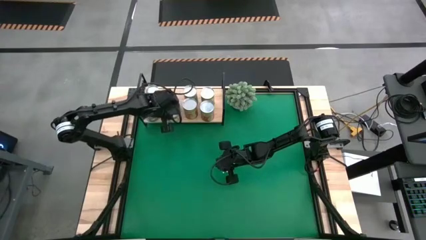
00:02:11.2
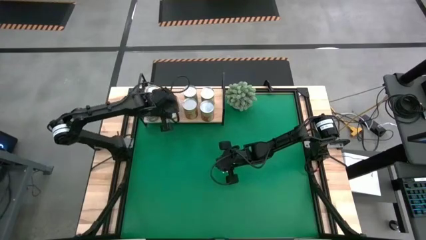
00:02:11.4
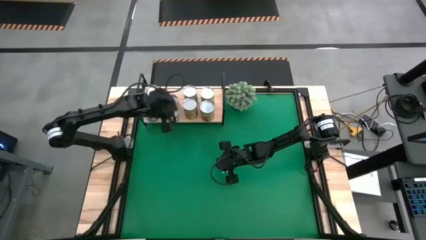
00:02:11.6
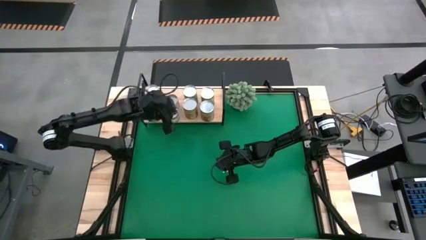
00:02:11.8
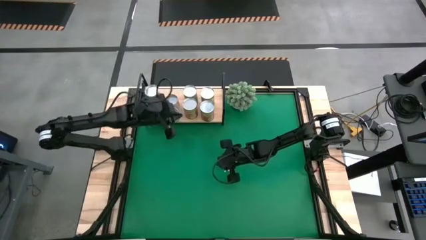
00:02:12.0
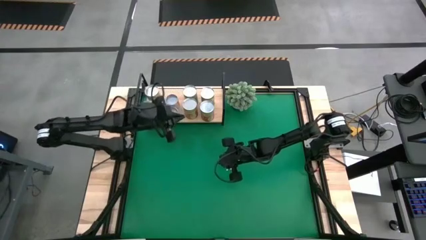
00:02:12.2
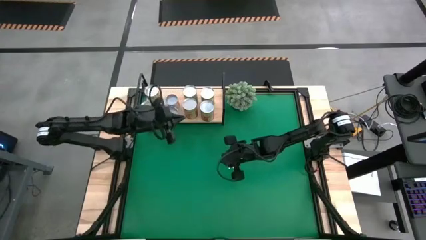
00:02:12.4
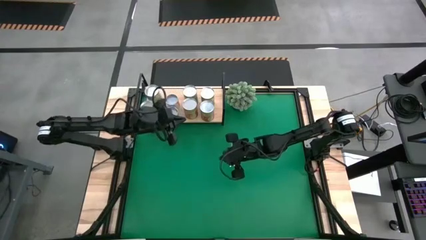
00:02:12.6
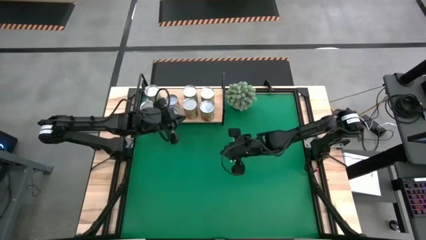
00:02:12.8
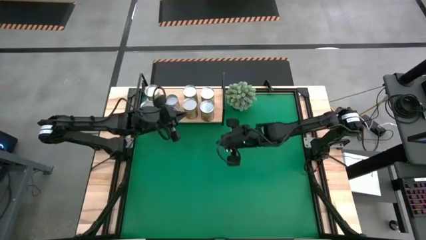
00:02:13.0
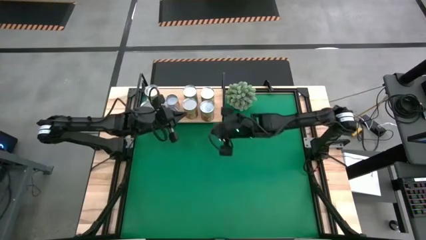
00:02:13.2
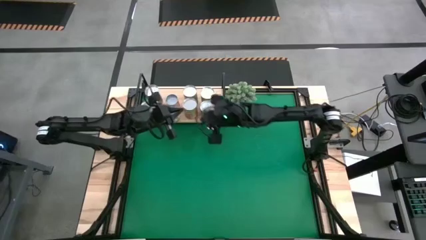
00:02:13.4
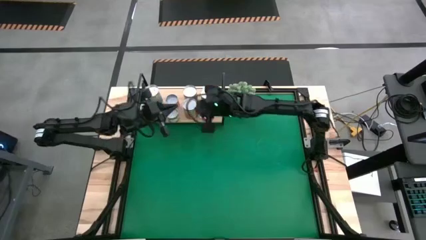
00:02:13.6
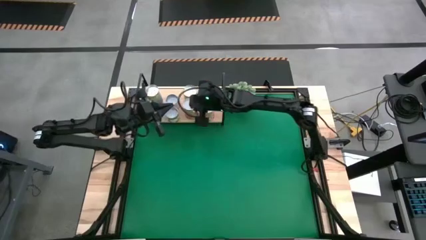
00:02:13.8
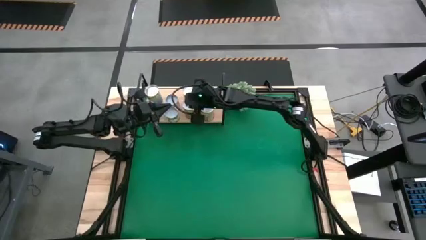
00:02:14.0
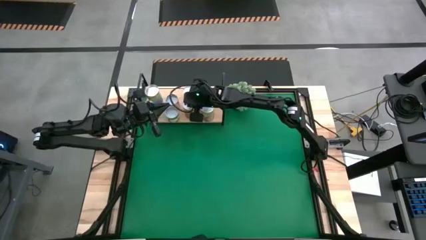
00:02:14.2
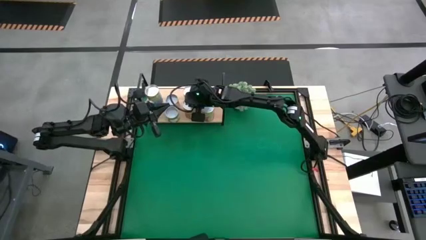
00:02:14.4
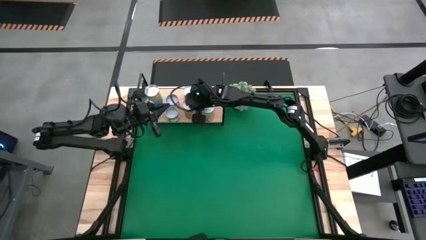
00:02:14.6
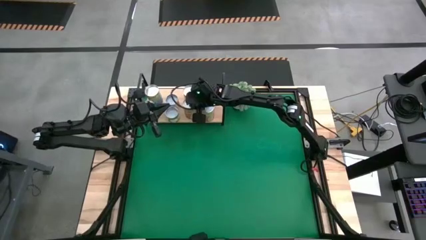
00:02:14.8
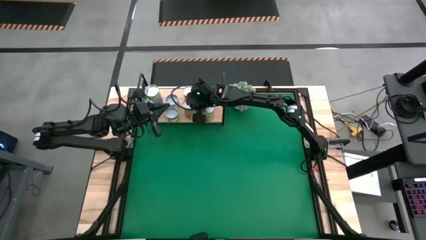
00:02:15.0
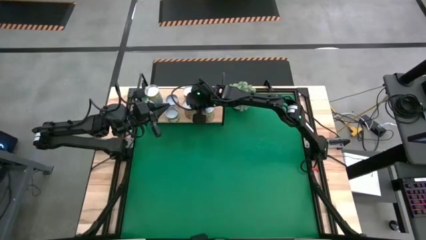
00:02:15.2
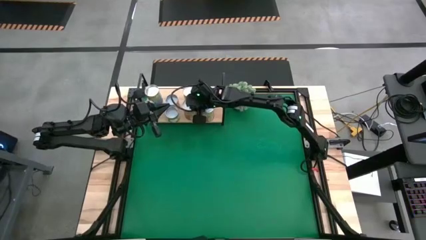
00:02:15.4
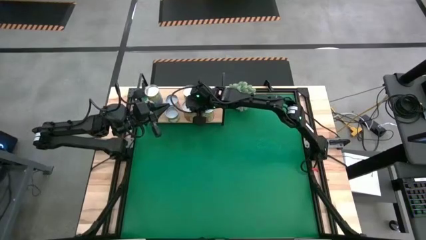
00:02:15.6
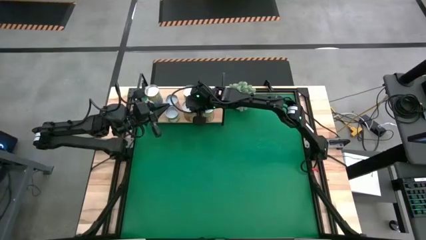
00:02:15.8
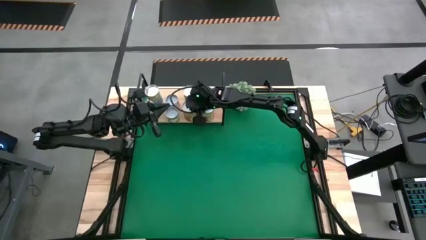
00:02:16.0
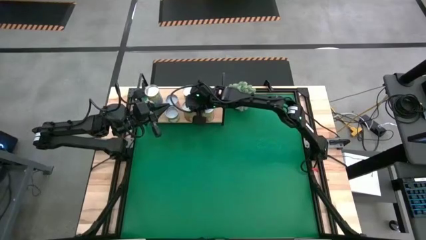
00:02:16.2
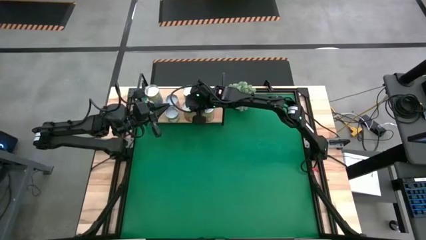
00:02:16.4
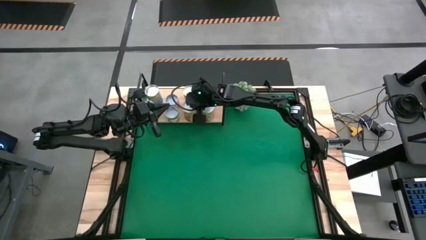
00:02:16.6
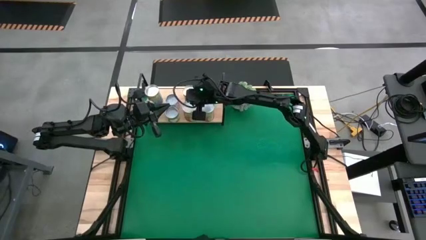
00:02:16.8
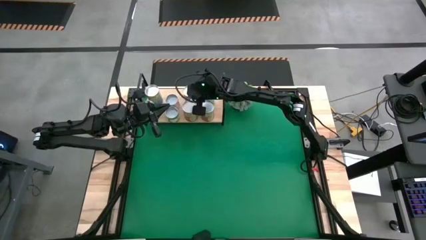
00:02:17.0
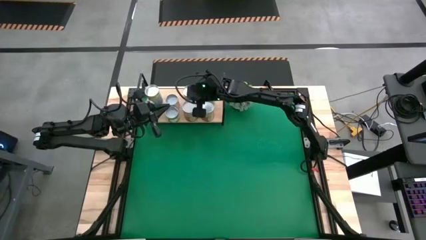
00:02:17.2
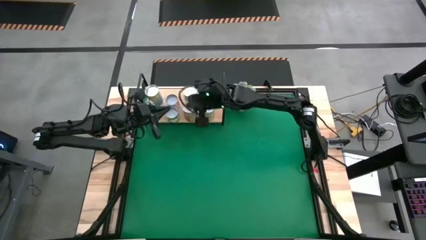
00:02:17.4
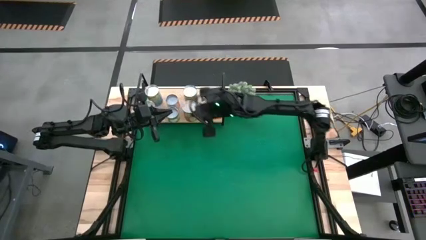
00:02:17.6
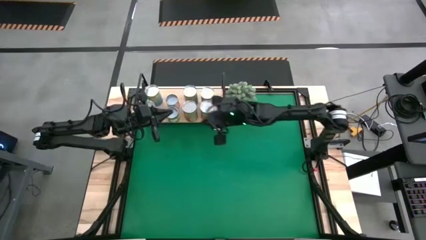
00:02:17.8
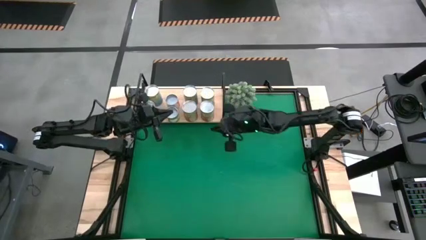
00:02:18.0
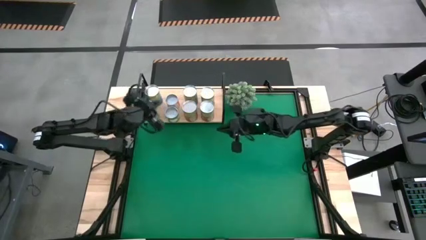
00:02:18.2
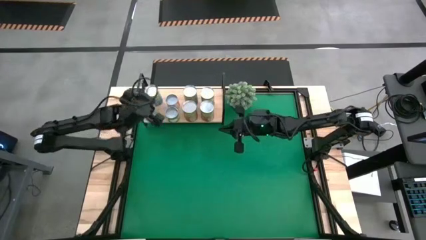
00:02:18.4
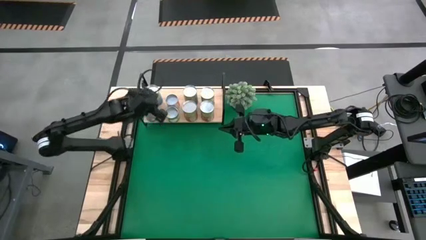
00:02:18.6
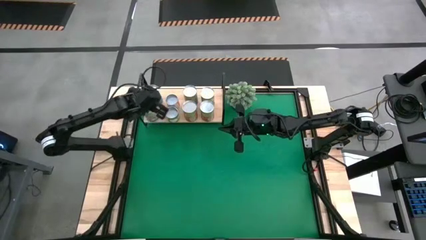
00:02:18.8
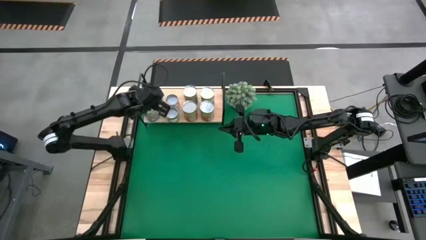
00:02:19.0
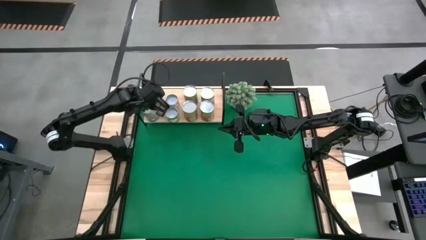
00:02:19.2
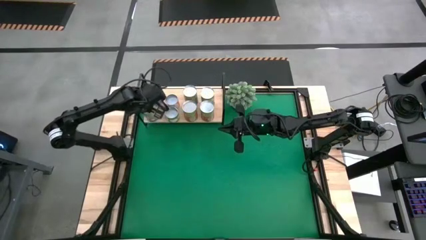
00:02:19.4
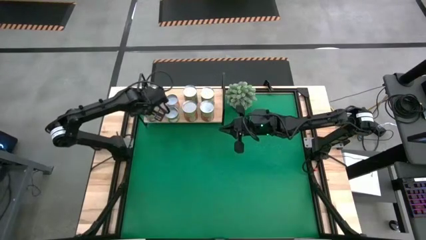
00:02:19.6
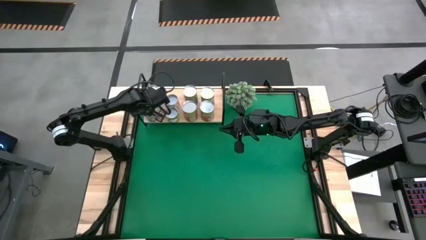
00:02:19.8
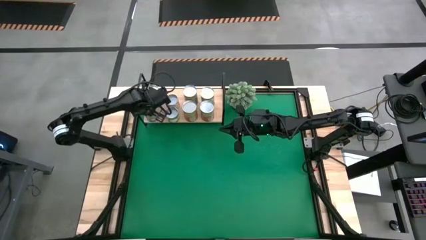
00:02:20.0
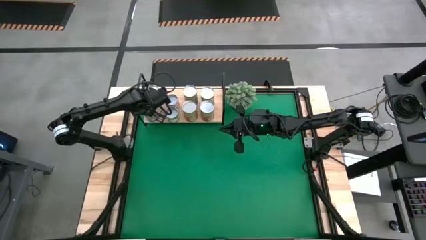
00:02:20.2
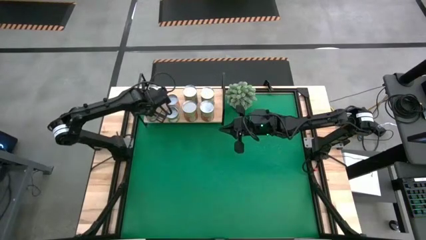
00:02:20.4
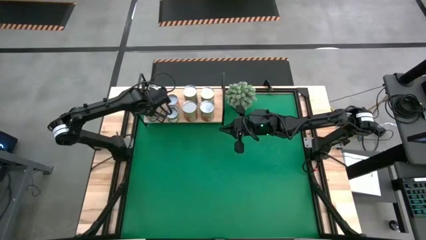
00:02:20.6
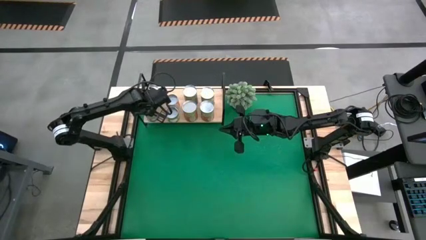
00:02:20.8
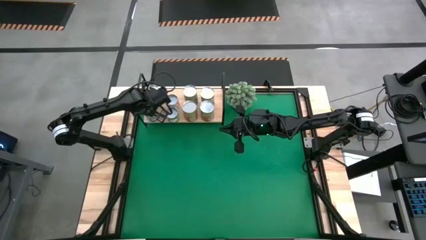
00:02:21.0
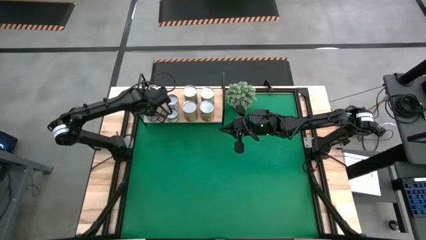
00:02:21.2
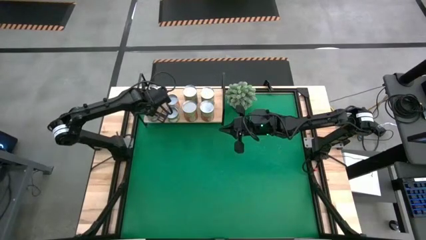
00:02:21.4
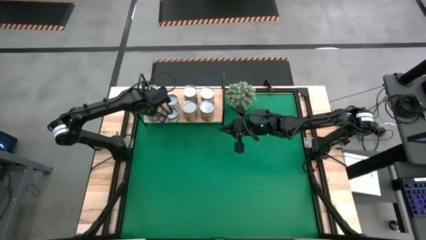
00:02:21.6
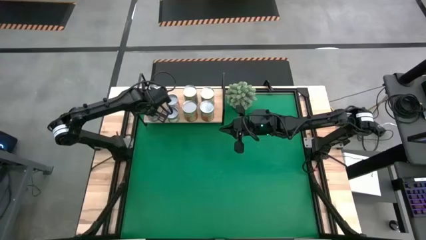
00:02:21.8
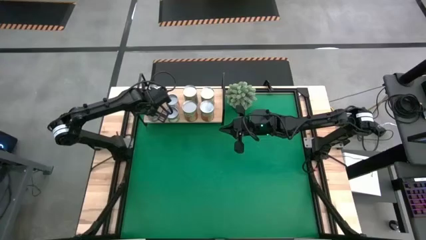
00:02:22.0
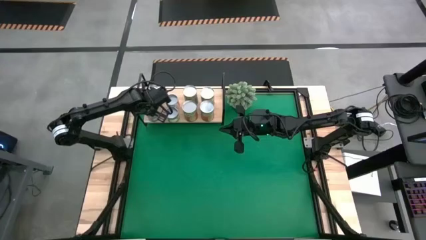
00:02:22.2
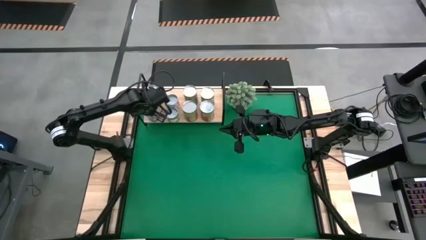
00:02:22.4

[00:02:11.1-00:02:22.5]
Task: Pick and place cans onto a shelf
Adjust the canned goods on the shelf

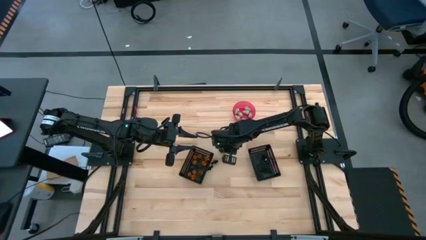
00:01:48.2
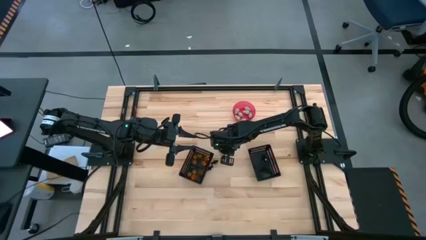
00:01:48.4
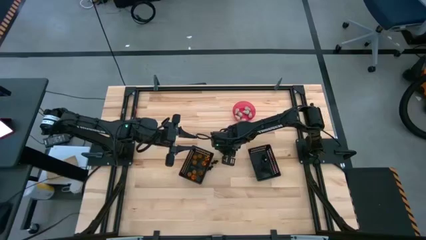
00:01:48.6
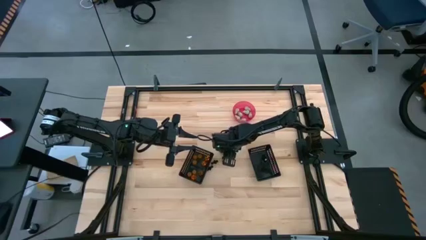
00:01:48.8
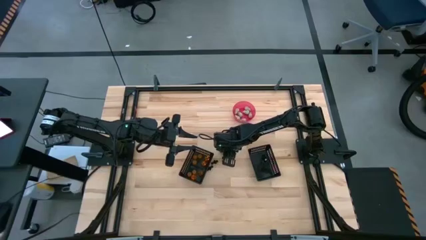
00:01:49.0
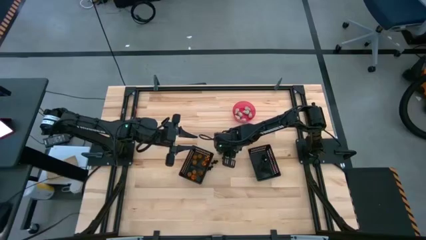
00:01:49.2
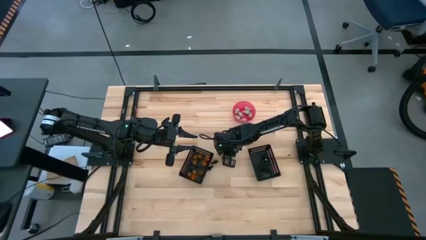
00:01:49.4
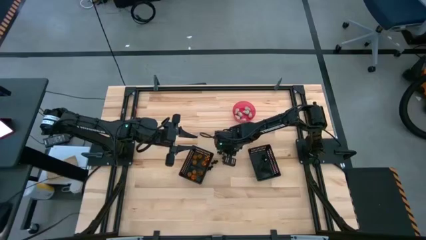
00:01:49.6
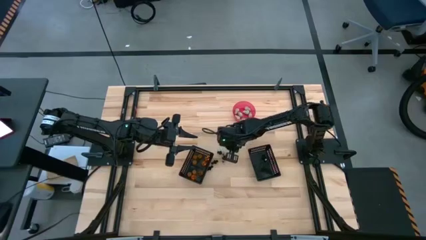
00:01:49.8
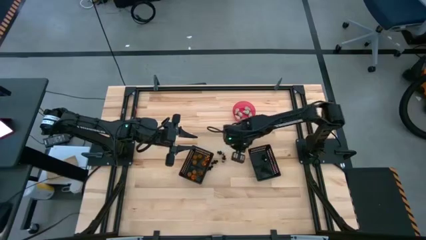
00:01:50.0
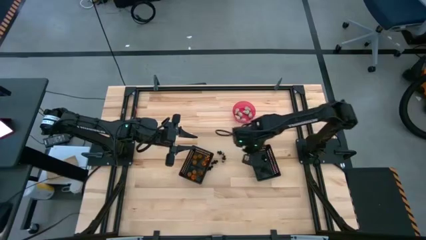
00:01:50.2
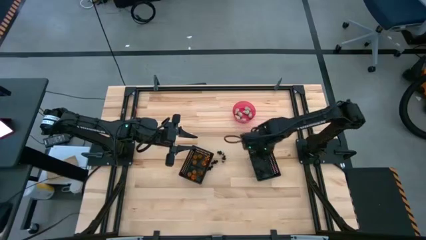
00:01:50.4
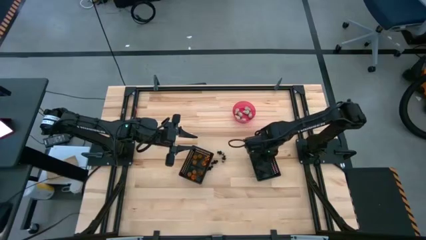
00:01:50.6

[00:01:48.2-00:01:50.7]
Task: Sort Halloween decoration
Put the black skeleton toy into the right black bin
